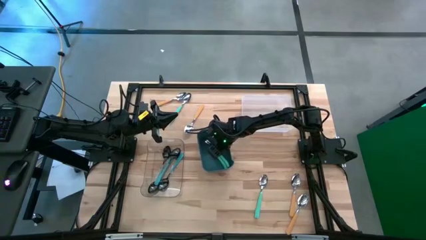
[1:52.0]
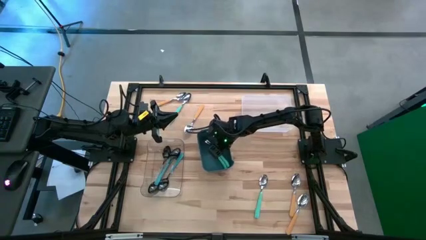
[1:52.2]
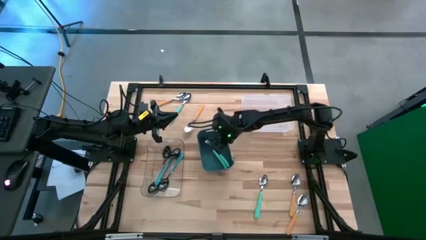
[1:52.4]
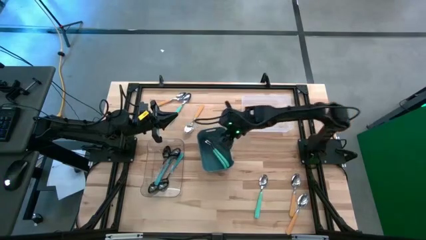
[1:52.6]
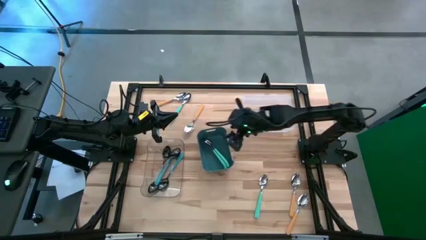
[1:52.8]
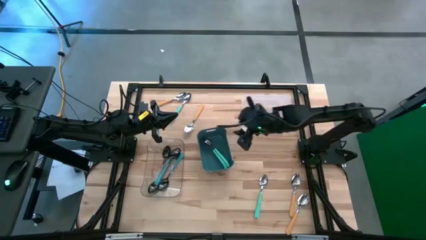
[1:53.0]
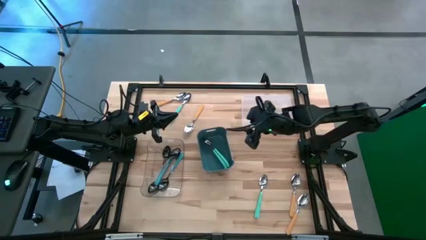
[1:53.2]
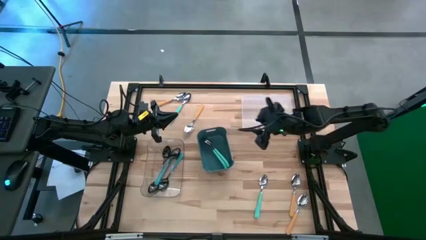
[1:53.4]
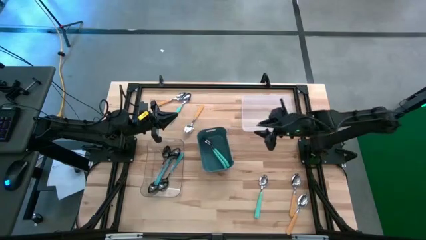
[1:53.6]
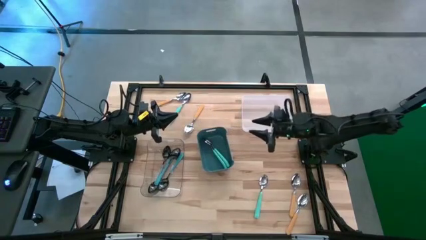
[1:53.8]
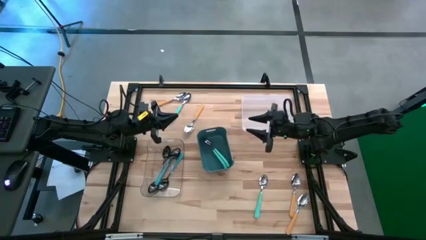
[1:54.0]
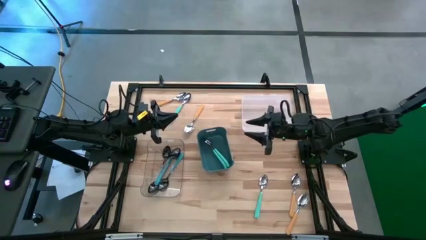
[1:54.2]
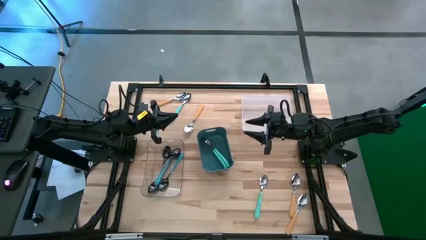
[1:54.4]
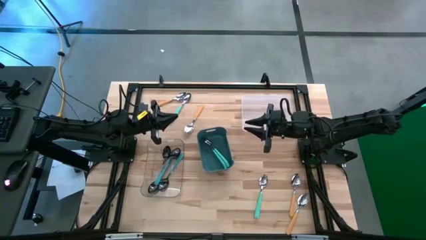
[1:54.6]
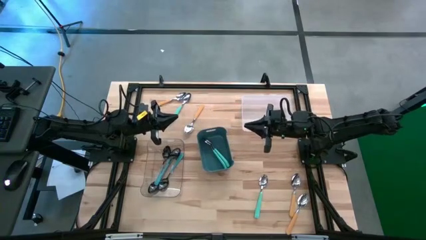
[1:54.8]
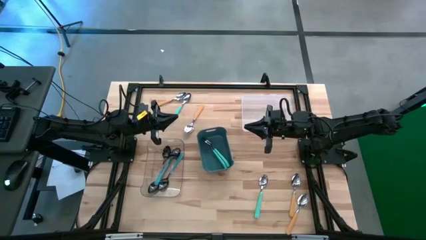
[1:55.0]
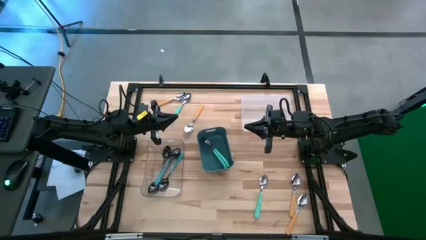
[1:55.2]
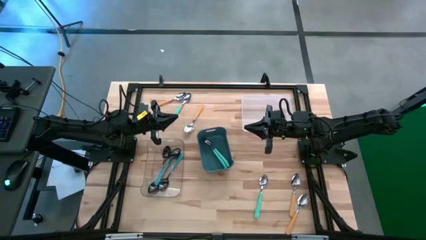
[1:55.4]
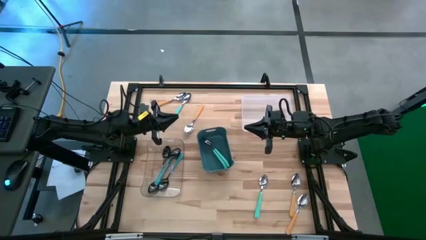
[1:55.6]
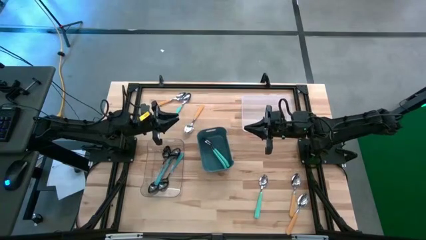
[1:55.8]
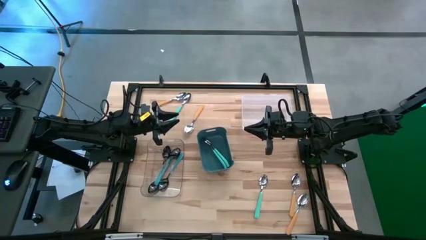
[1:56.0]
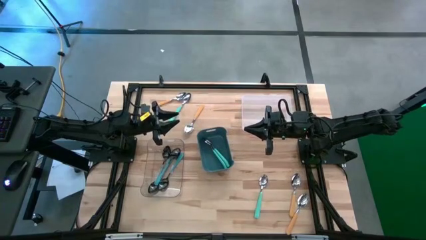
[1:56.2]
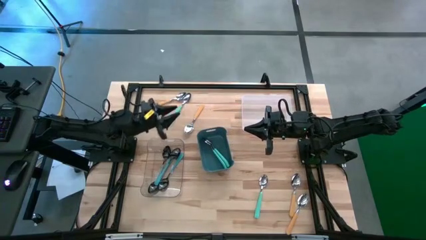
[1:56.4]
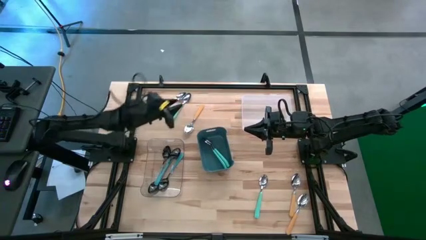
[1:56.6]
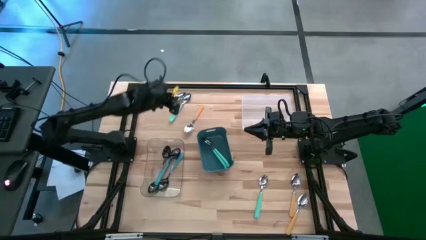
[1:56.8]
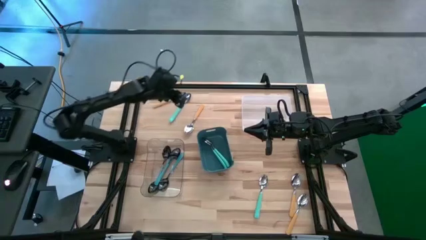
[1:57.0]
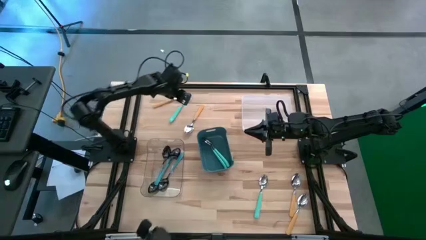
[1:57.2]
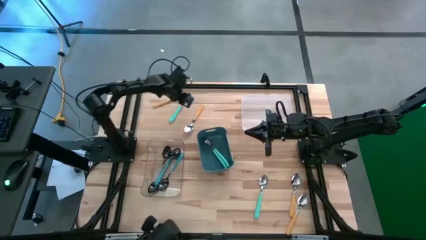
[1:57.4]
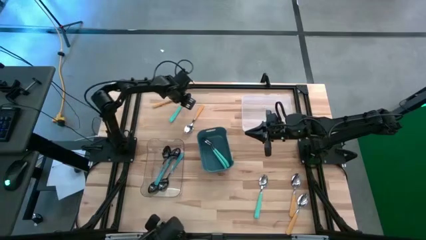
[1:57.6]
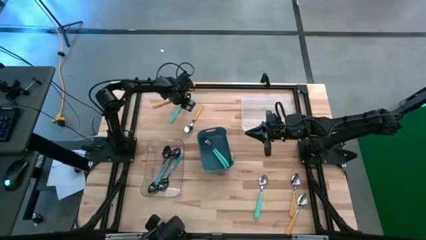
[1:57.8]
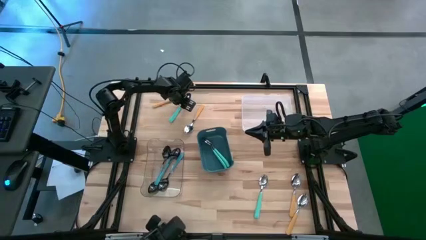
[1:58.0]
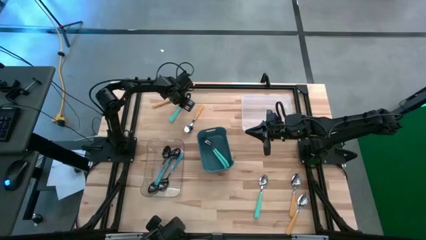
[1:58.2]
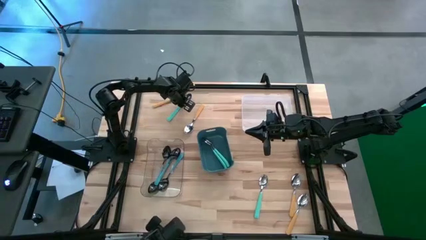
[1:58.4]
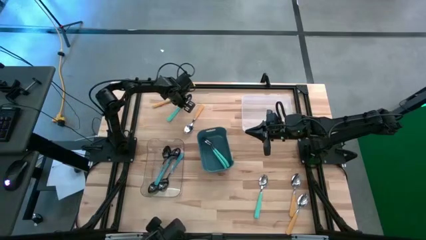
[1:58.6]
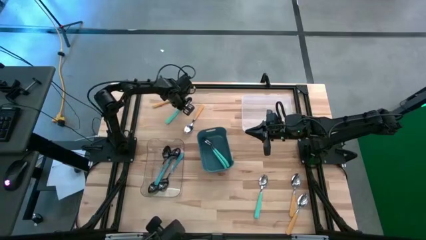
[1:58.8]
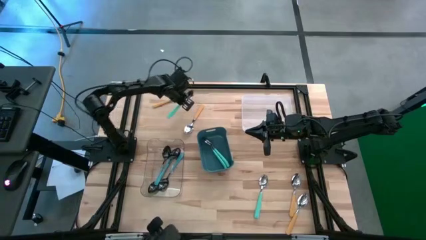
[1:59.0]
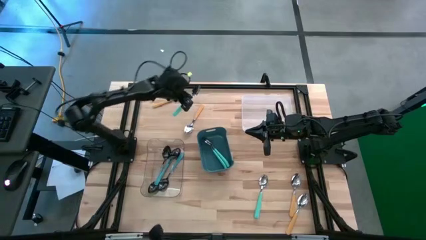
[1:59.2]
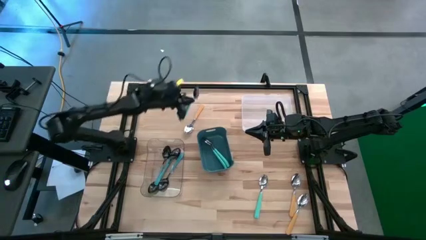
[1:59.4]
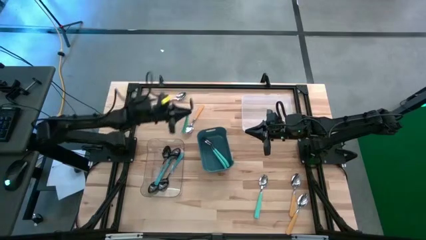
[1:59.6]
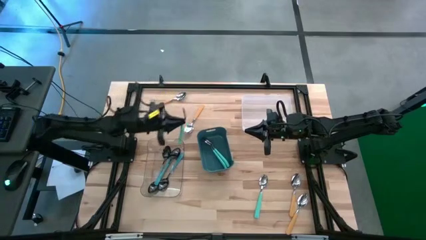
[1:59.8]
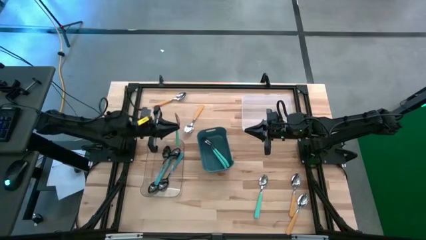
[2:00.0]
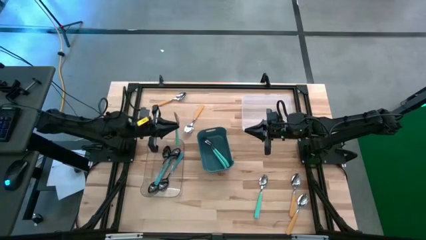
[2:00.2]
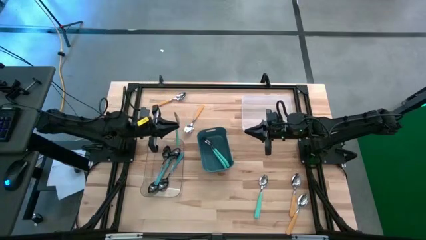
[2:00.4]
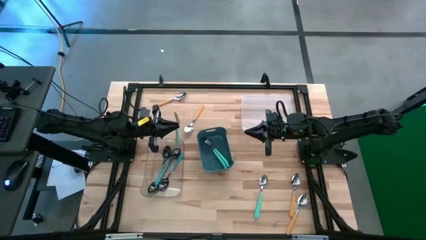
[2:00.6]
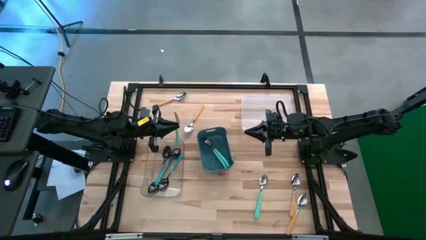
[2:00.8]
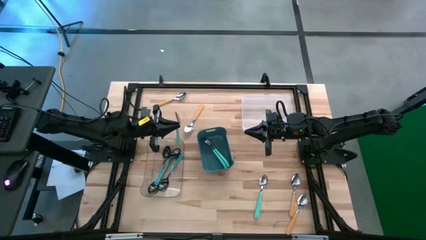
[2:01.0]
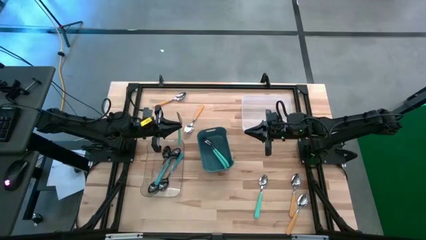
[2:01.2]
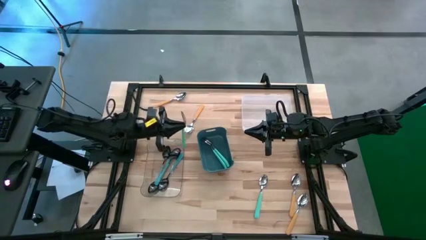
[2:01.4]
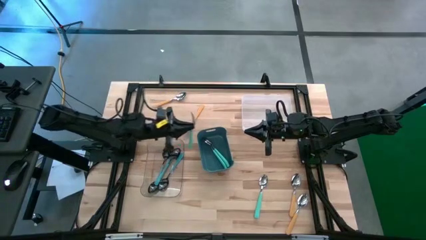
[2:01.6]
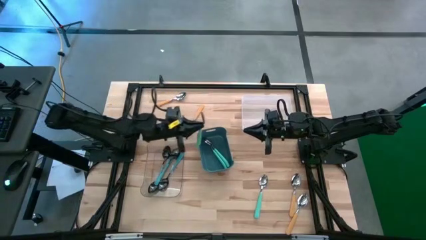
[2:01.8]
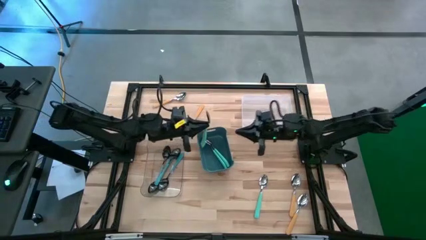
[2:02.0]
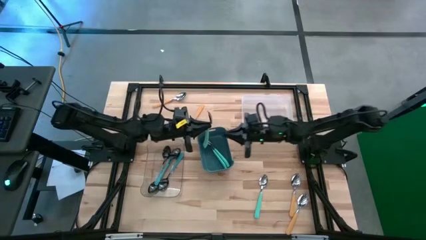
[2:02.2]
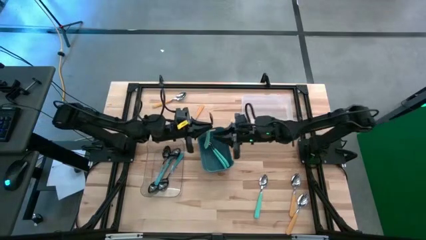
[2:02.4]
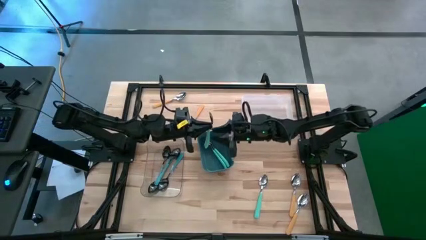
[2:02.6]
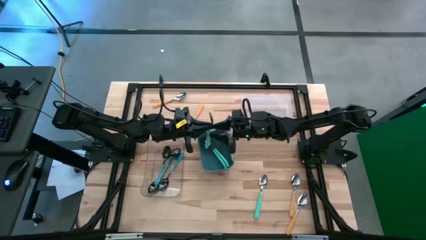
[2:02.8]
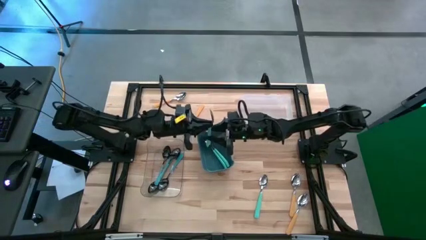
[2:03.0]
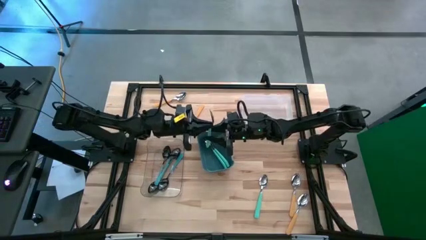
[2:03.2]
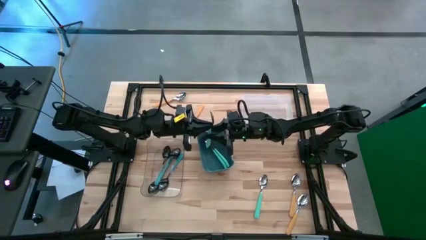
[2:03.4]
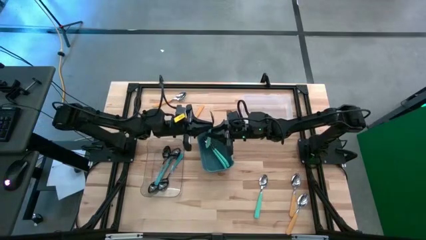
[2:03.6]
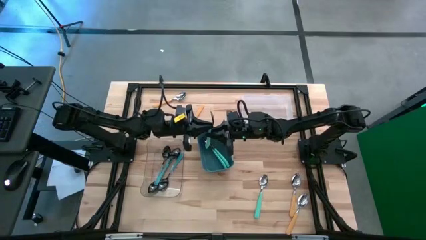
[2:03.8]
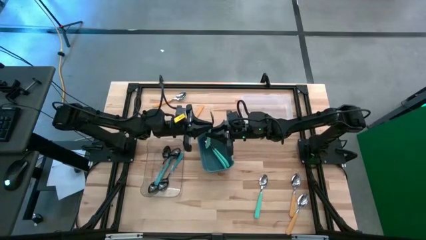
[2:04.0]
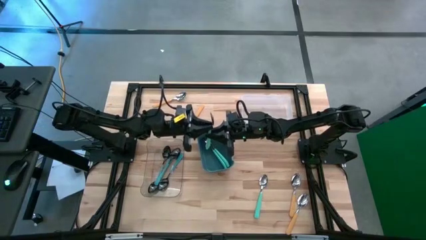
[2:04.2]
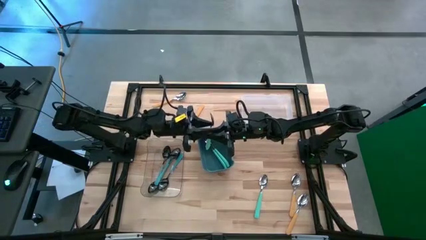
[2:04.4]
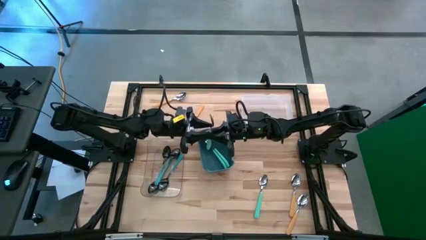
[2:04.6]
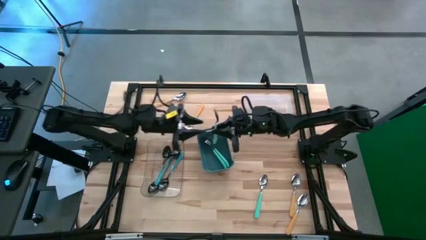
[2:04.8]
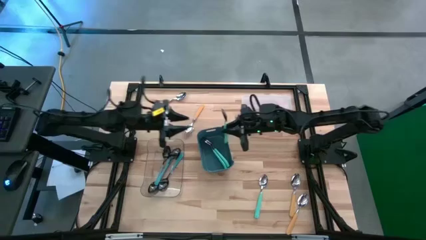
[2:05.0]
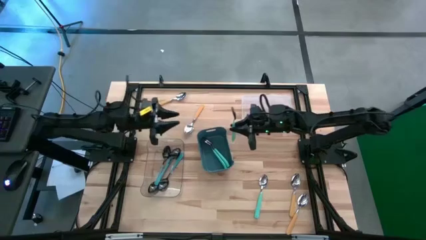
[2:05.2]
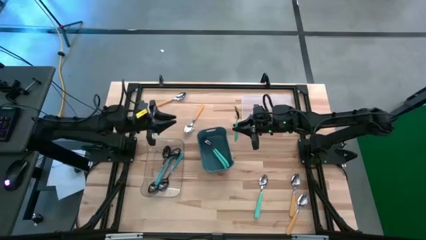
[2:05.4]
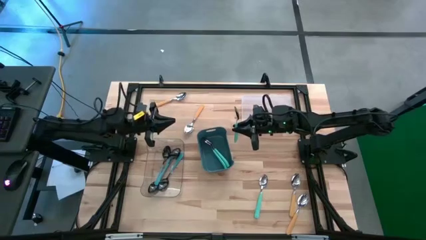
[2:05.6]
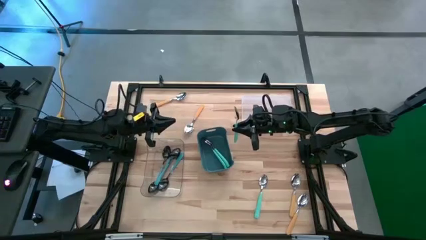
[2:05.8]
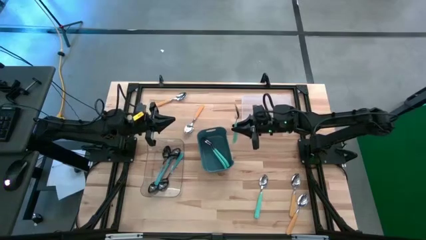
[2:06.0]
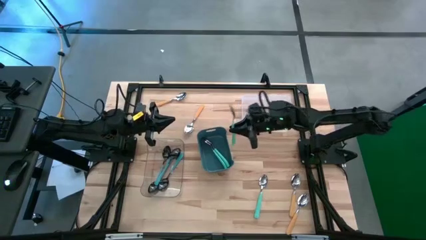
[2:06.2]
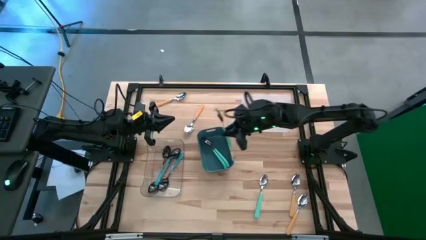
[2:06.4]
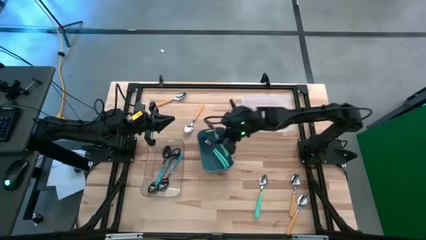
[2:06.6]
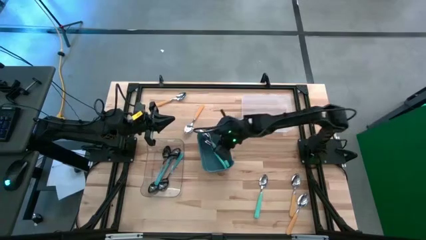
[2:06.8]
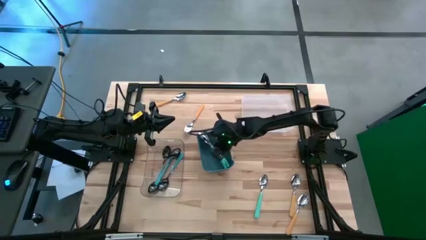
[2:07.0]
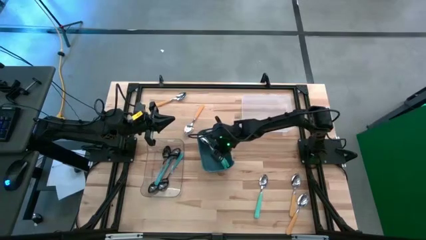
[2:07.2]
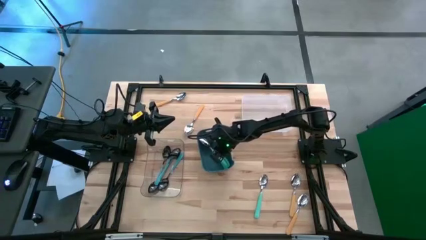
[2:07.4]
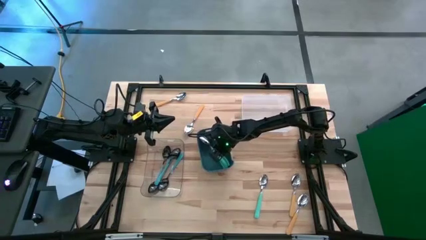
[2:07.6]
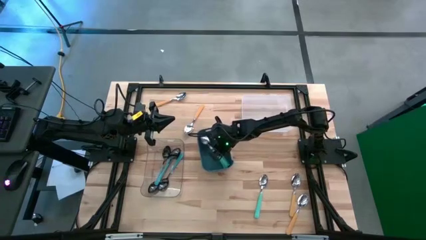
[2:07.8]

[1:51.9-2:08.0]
Task: Sort silverware by color (type)
Put the light blue spoon into the blue bin

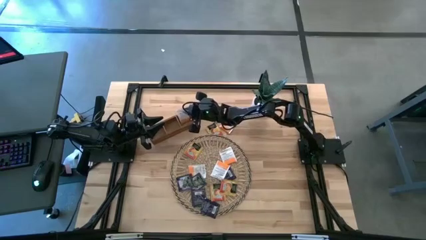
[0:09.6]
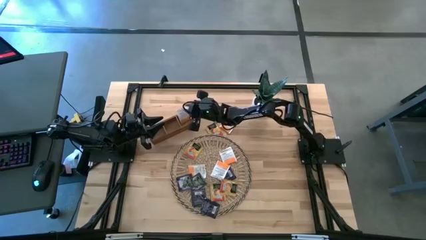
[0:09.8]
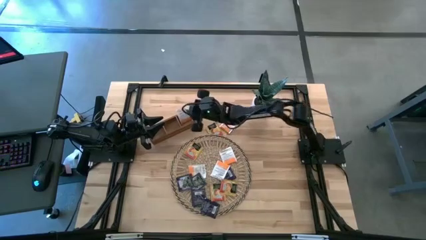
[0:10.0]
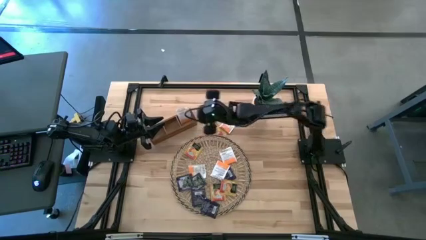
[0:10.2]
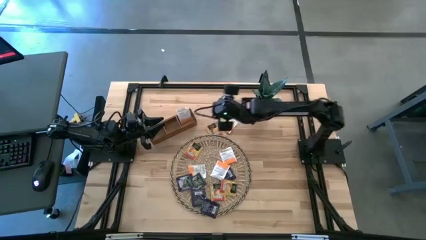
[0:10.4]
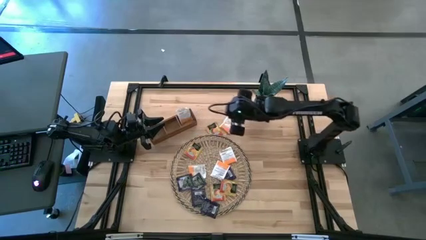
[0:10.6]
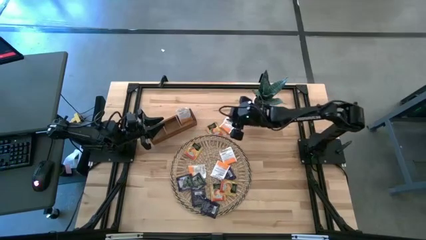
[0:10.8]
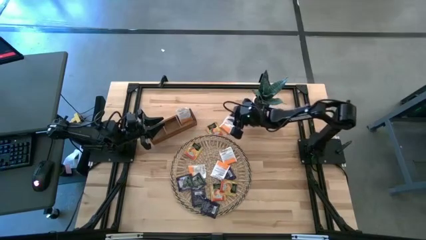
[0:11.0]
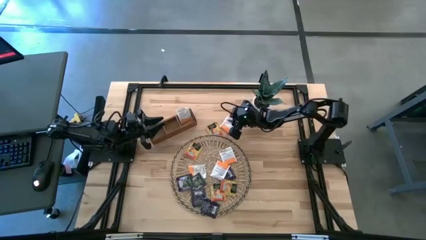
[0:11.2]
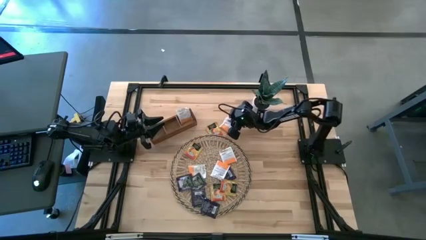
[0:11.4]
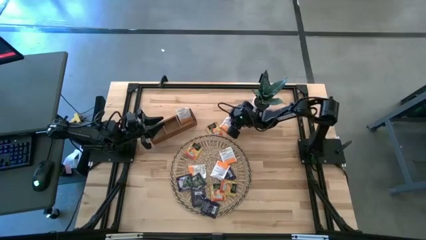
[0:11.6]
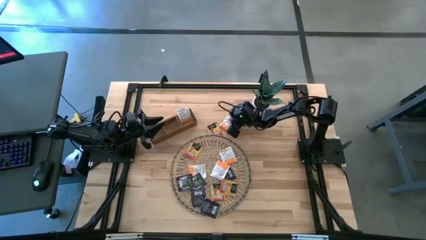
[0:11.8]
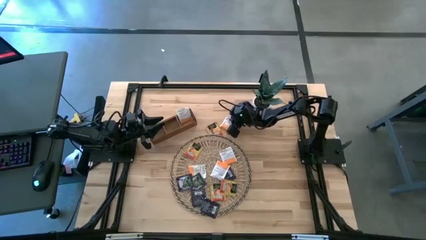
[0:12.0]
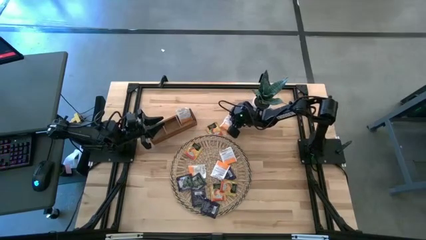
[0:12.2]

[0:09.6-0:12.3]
Task: Pick & Place Tea
Put the white tea bag into the right compartment of the wooden organizer
